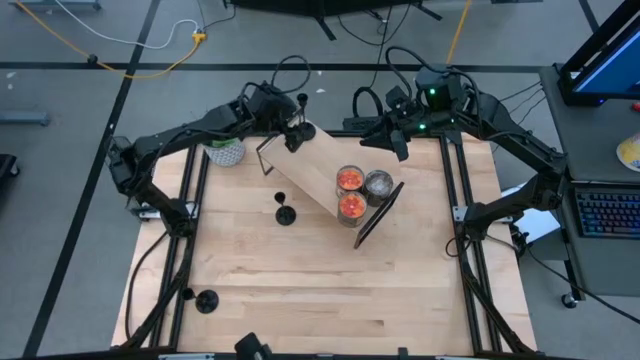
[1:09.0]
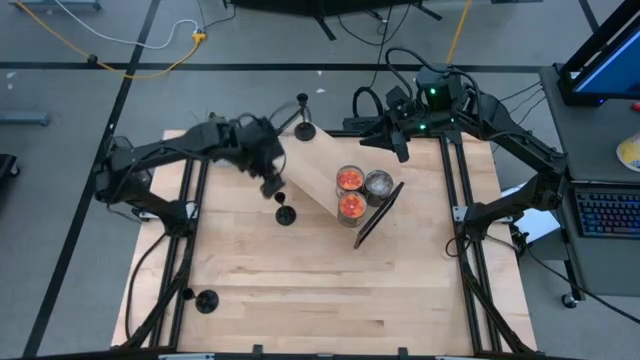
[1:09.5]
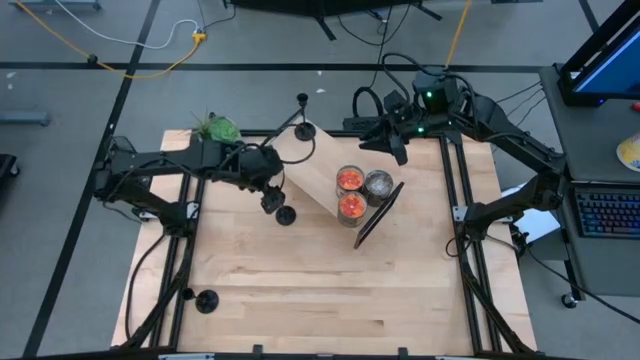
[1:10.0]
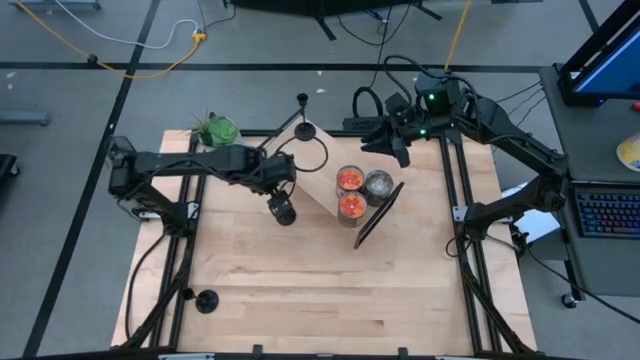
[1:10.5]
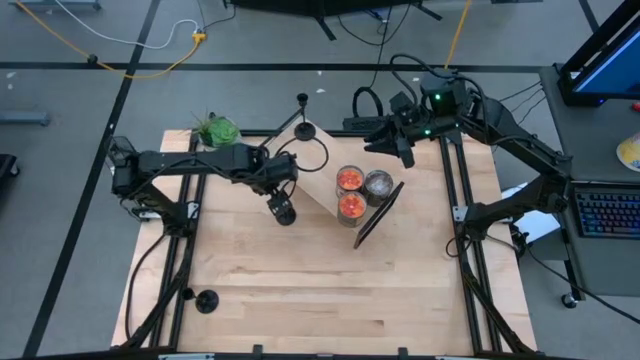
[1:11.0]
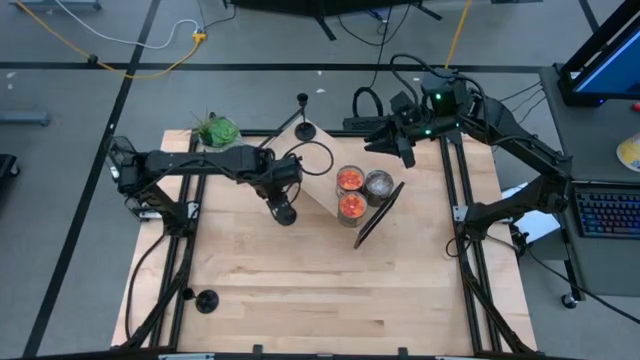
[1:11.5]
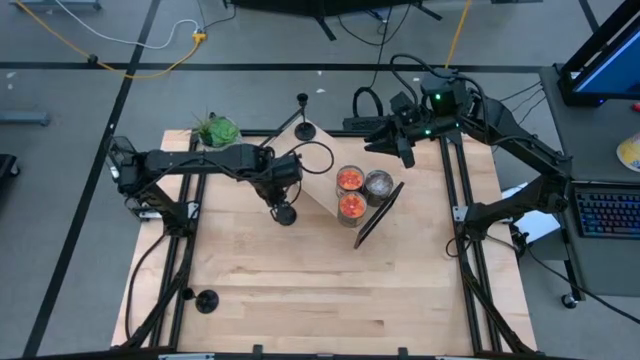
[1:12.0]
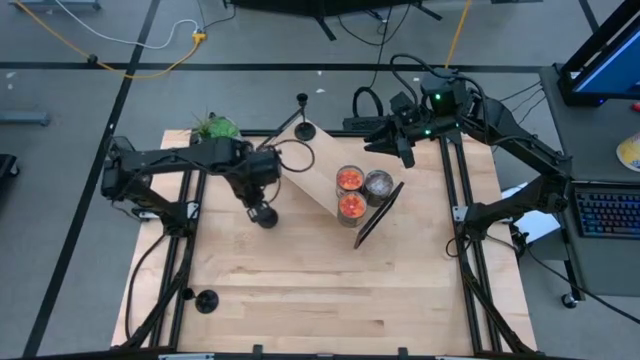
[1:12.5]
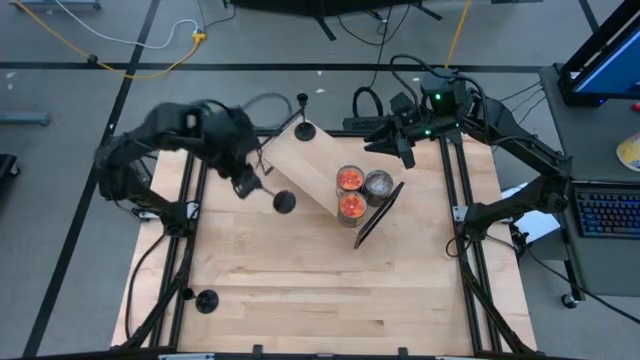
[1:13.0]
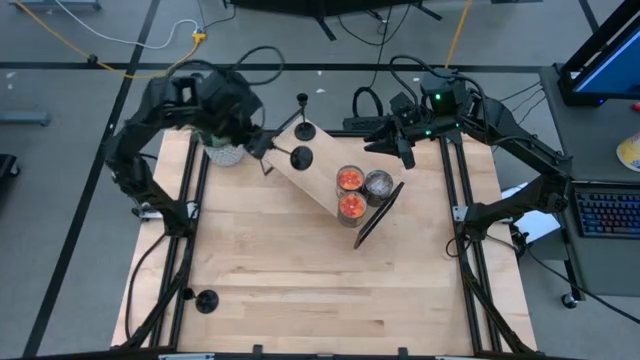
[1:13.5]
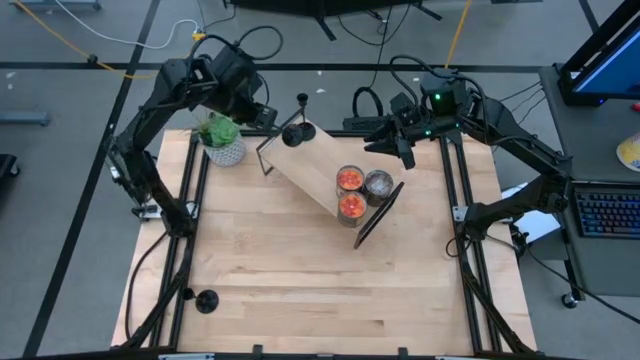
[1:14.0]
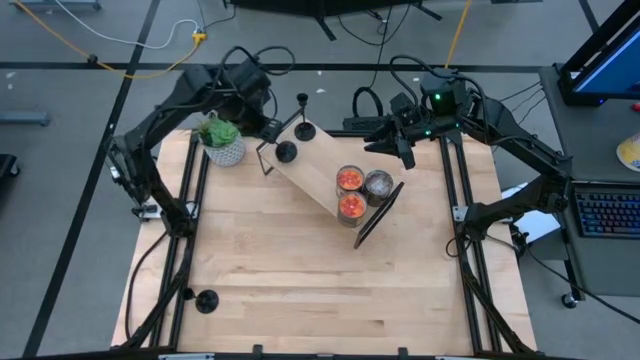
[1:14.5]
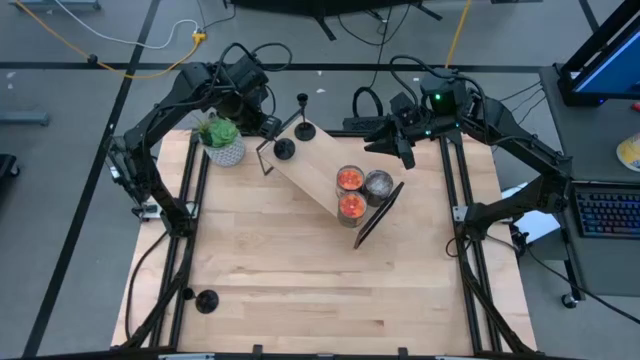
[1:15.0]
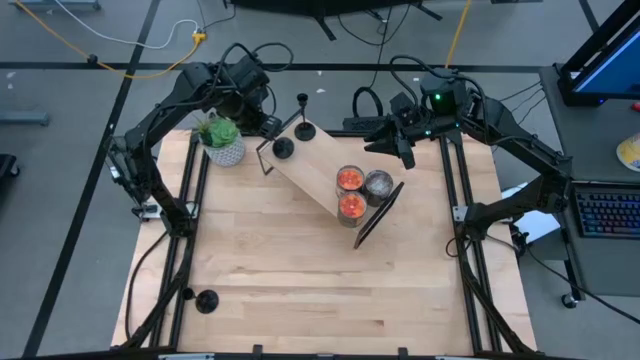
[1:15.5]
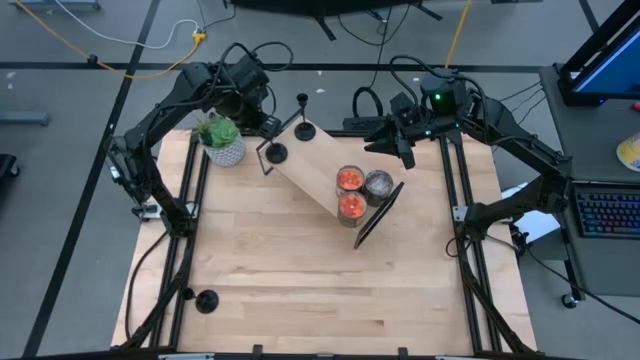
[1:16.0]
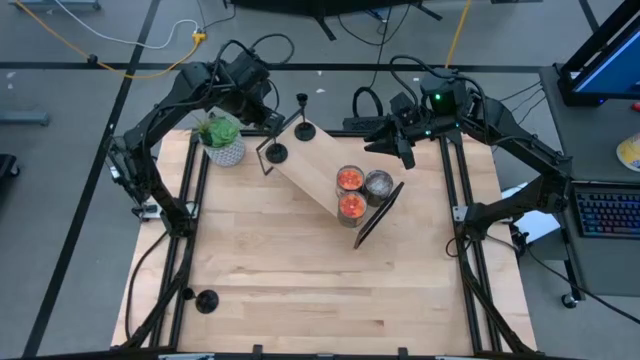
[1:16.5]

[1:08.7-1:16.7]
Task: Pick & Place candle stick holders
Put the top black candle holder on the shelf

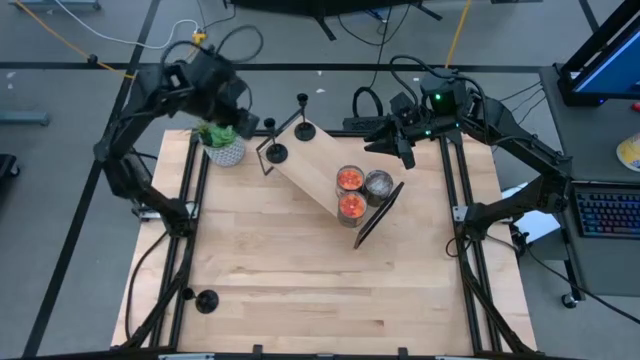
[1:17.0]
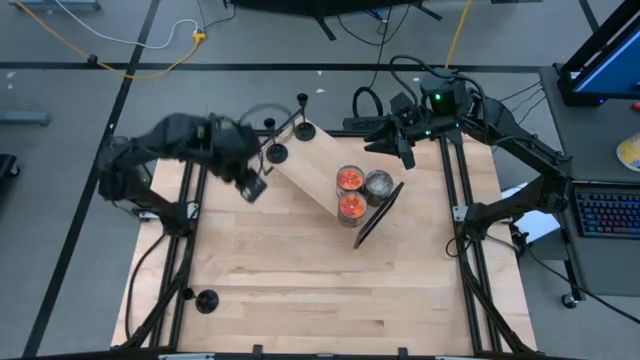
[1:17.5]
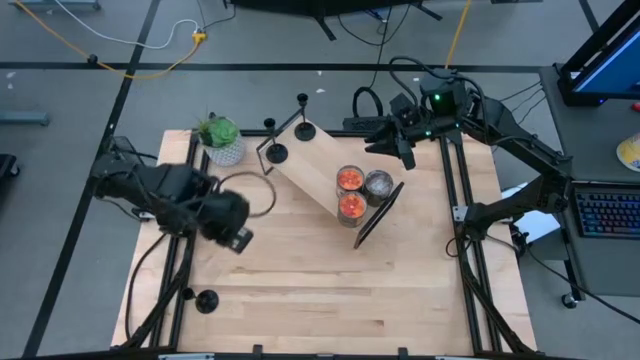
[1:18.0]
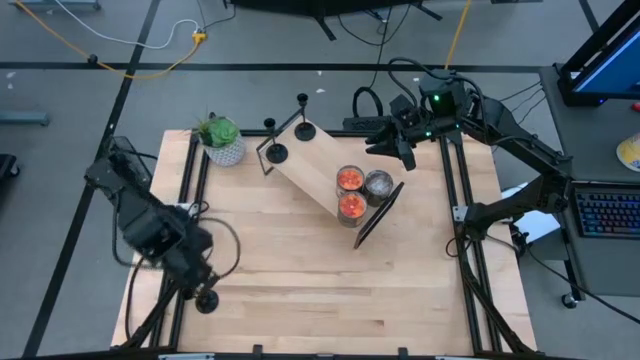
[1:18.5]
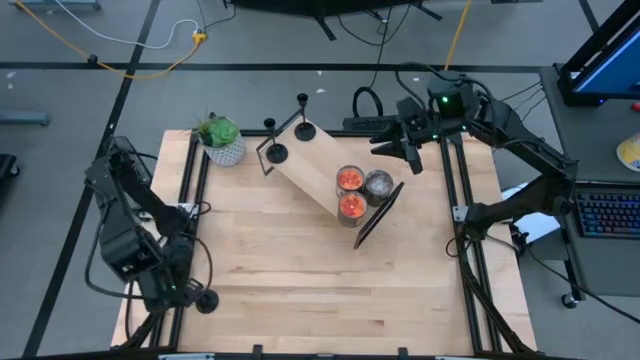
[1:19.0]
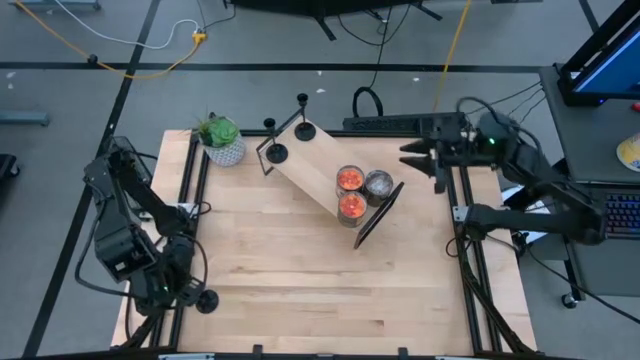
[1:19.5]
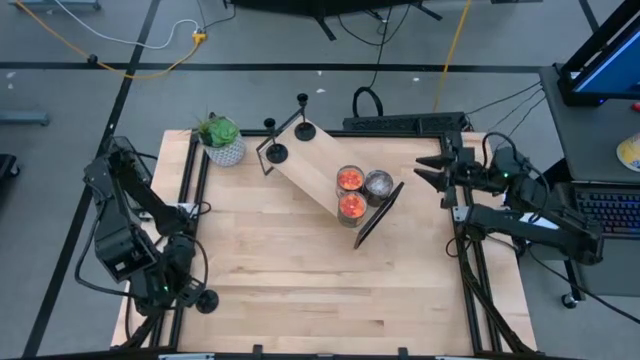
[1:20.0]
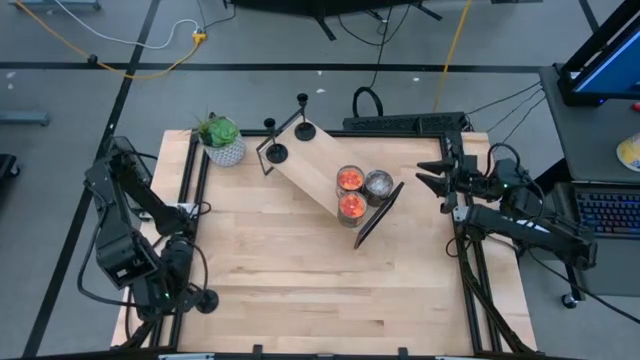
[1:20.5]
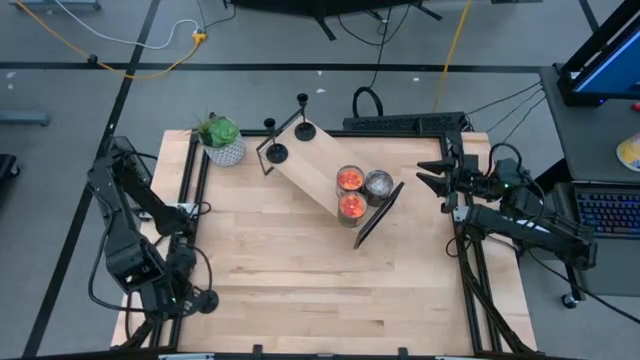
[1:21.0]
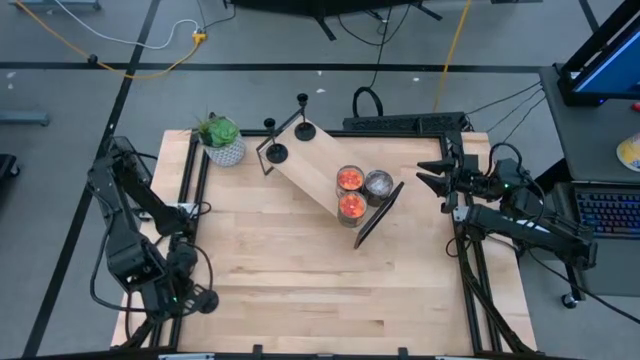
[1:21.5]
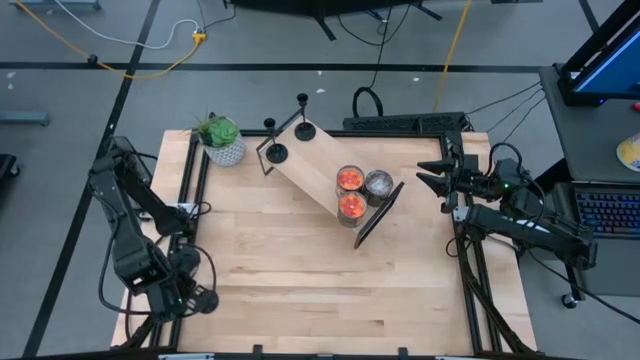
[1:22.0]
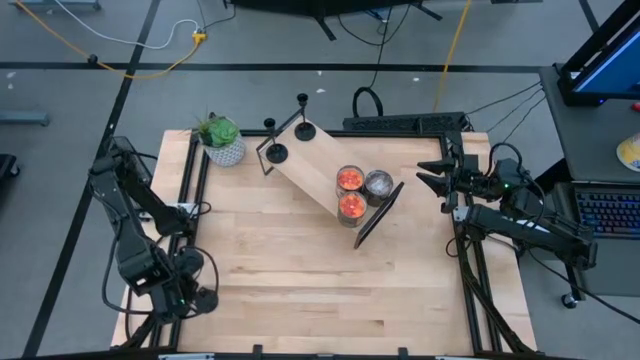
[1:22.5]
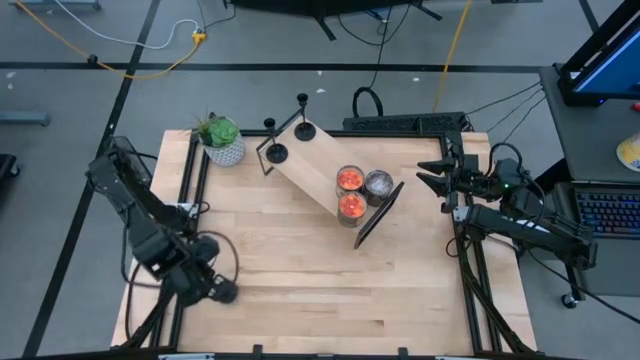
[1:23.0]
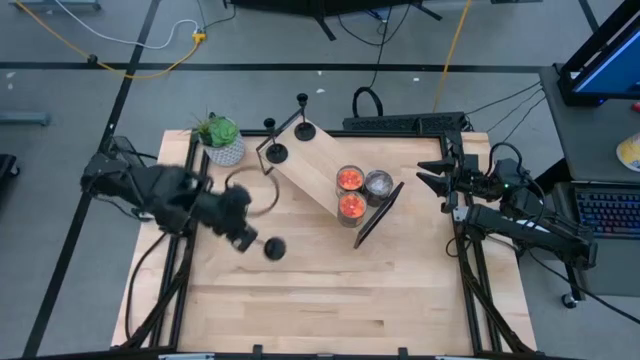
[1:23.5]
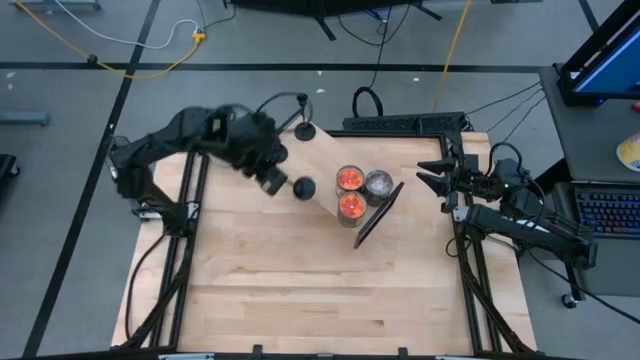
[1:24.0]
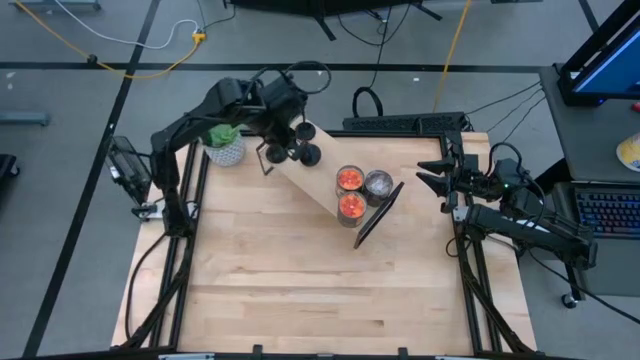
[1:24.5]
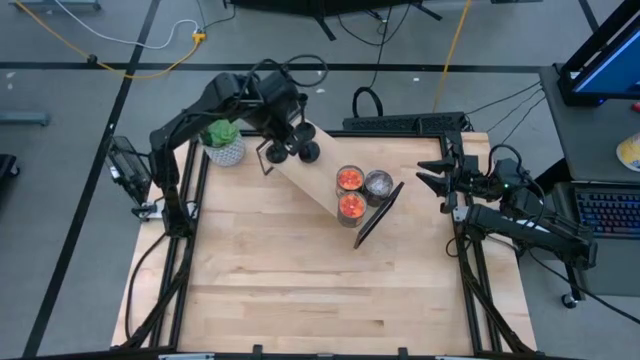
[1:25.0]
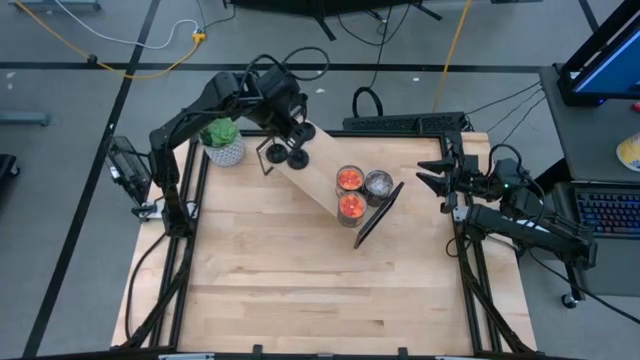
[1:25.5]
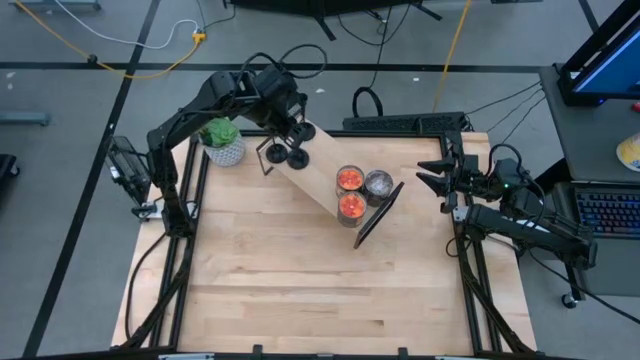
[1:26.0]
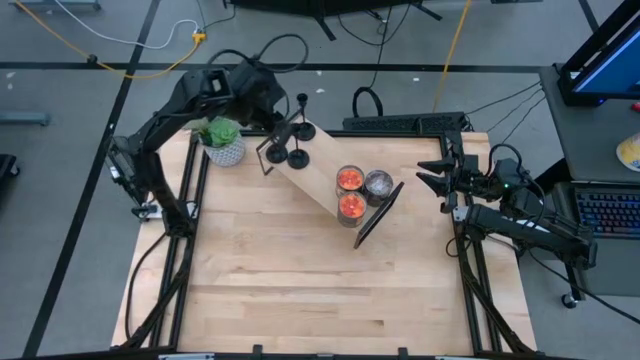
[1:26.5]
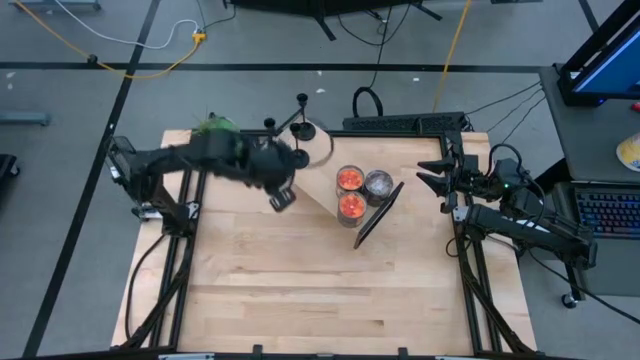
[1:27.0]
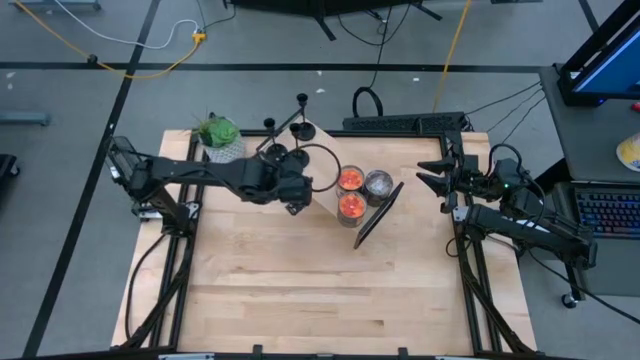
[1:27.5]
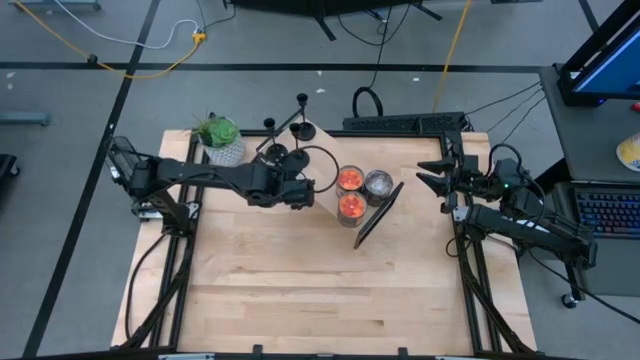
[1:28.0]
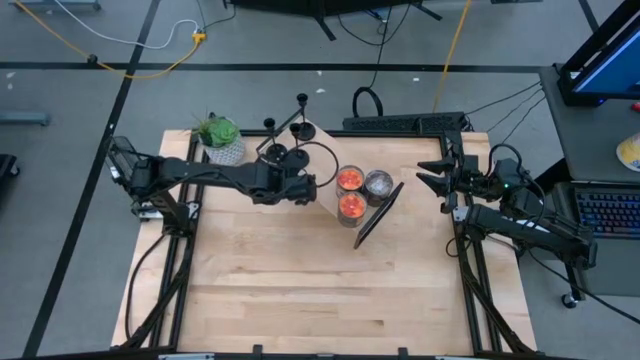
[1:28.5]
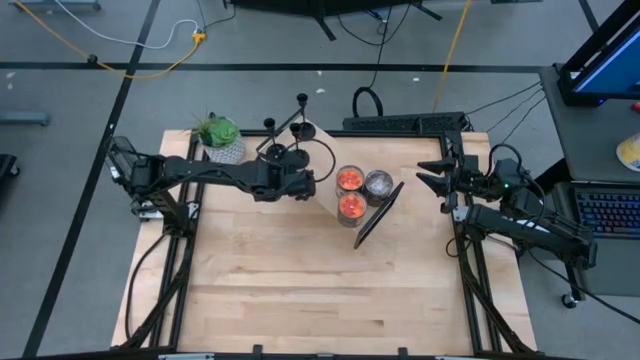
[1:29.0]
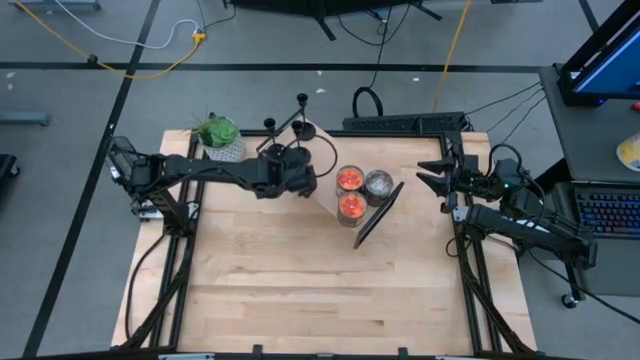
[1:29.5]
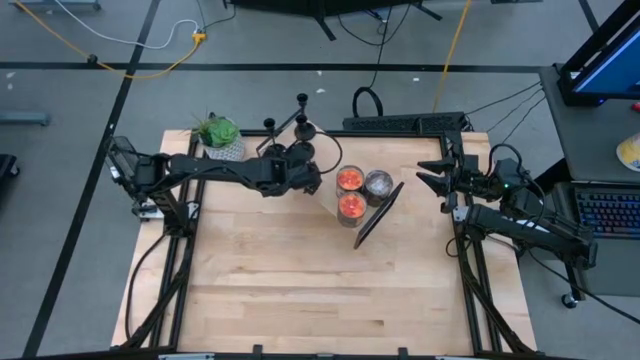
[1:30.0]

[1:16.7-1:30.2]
Put the black candle holder on the shelf
